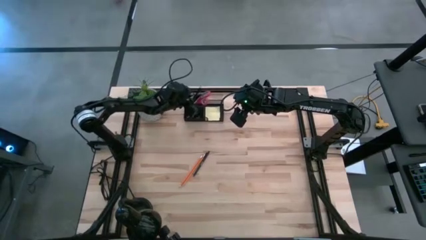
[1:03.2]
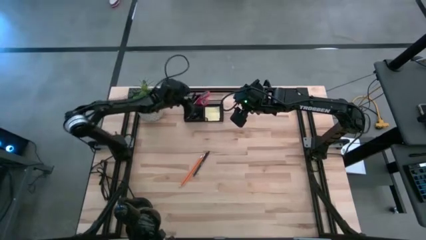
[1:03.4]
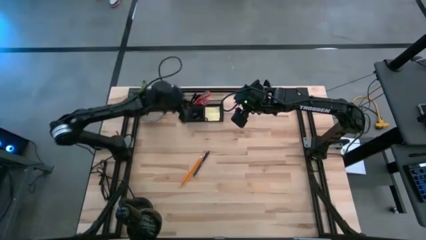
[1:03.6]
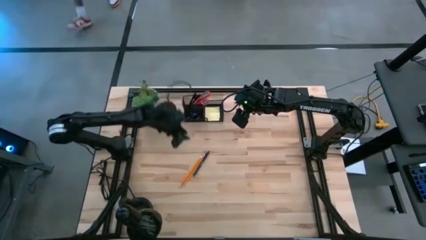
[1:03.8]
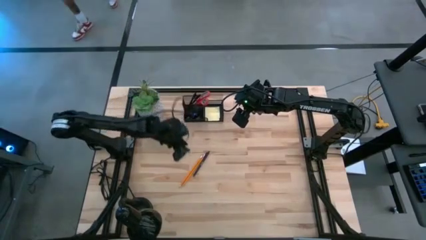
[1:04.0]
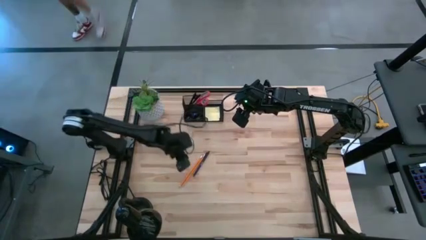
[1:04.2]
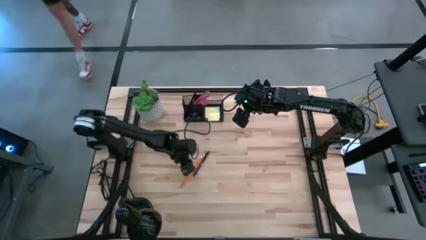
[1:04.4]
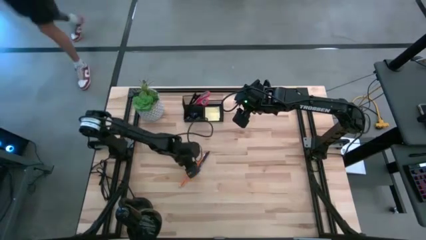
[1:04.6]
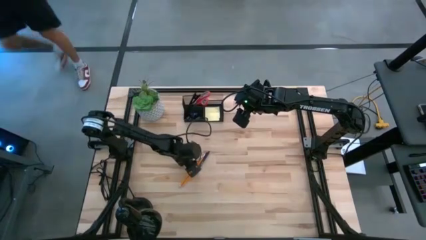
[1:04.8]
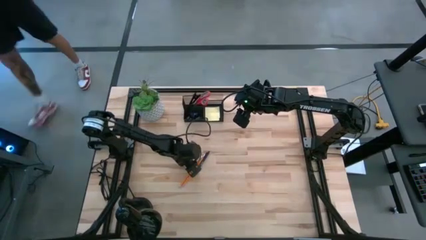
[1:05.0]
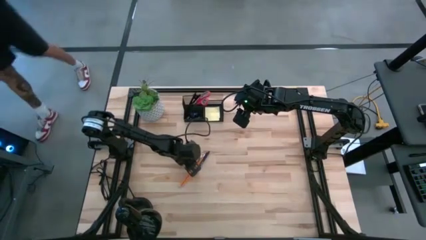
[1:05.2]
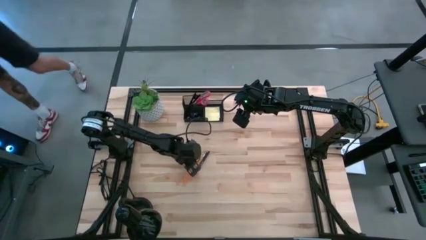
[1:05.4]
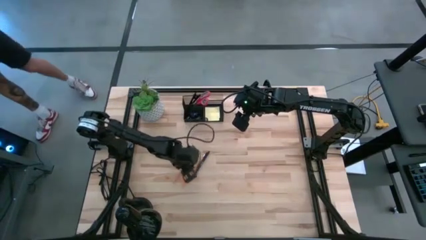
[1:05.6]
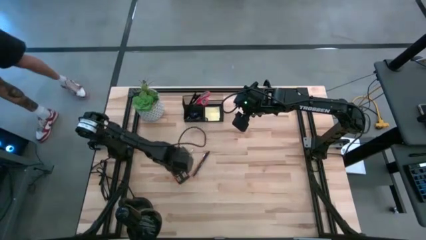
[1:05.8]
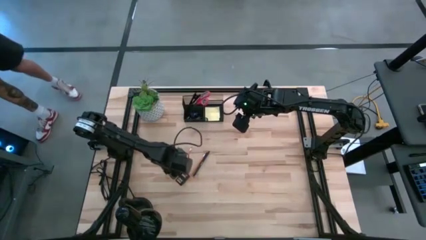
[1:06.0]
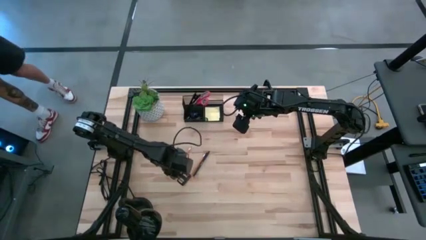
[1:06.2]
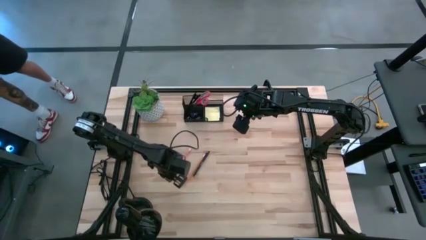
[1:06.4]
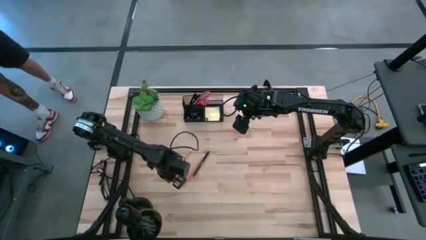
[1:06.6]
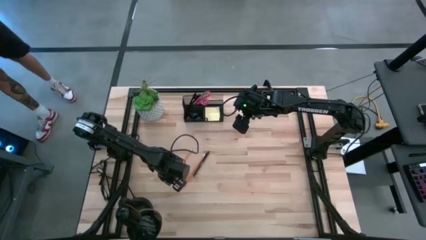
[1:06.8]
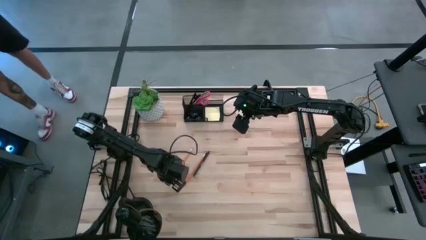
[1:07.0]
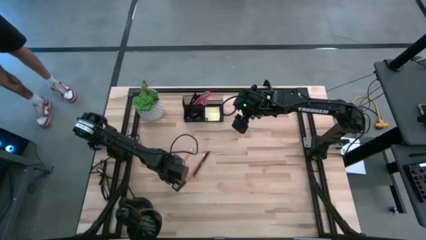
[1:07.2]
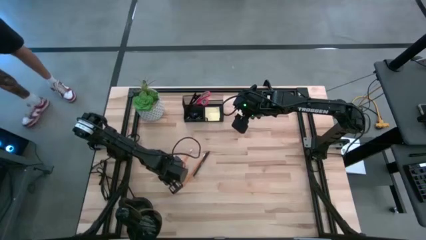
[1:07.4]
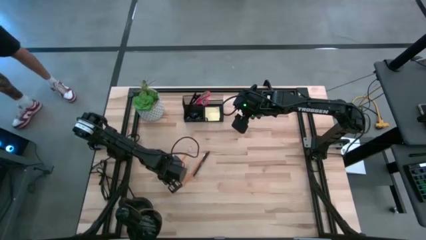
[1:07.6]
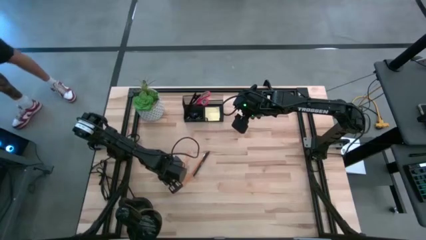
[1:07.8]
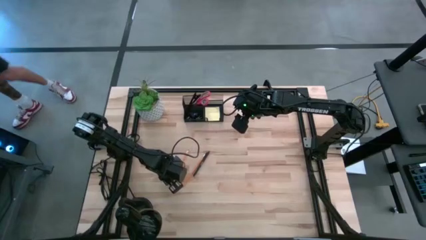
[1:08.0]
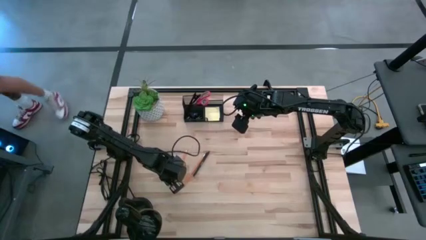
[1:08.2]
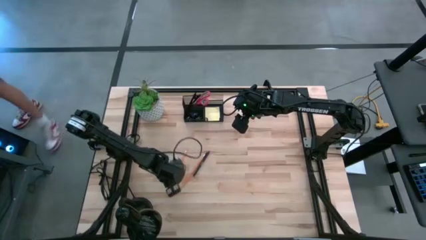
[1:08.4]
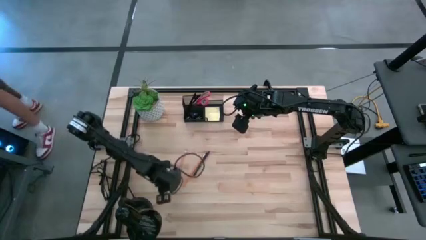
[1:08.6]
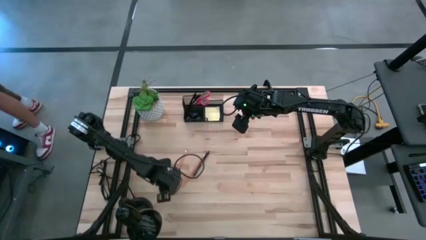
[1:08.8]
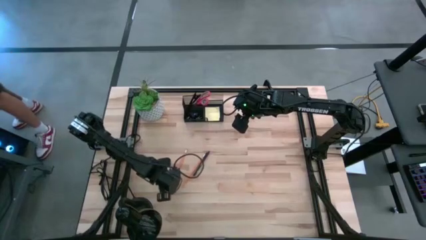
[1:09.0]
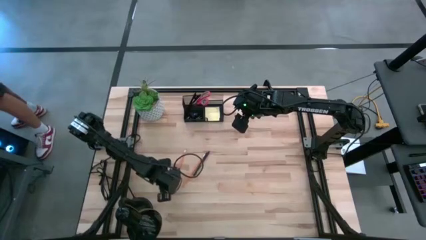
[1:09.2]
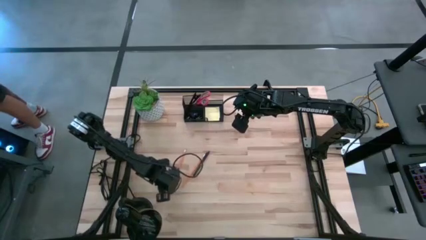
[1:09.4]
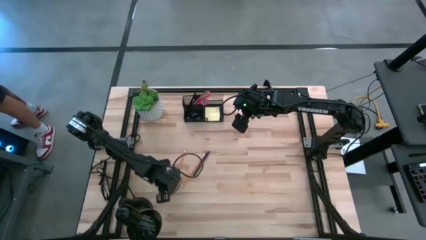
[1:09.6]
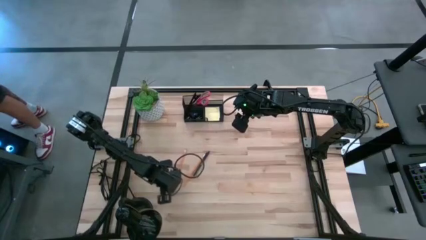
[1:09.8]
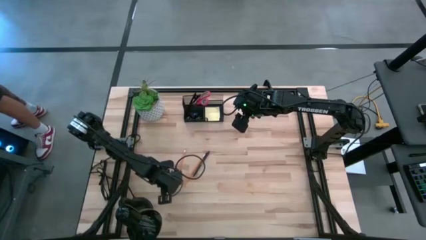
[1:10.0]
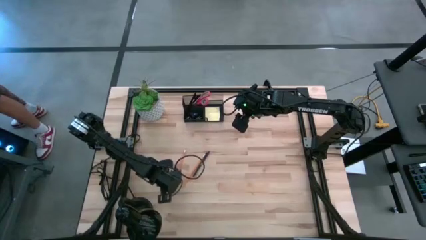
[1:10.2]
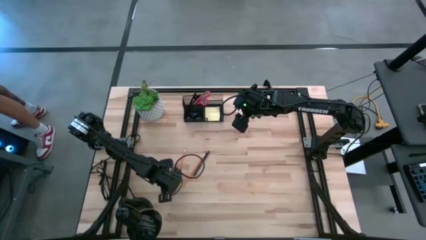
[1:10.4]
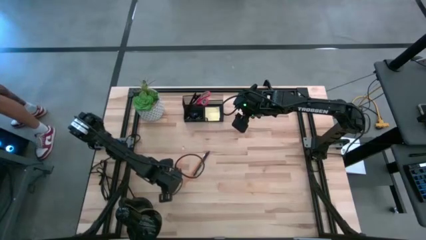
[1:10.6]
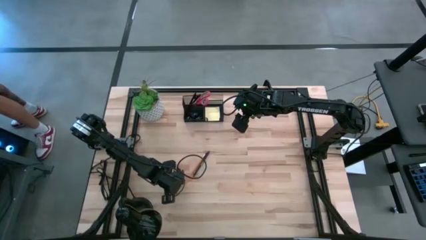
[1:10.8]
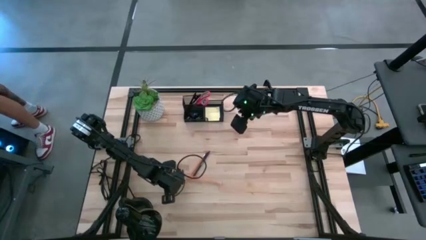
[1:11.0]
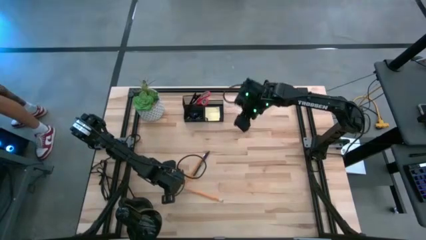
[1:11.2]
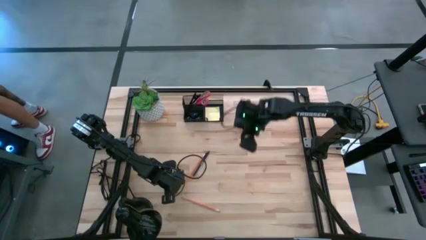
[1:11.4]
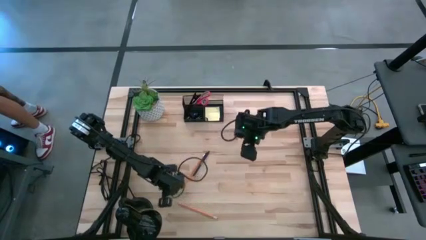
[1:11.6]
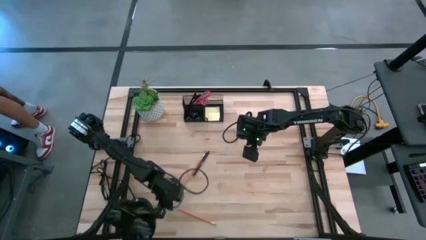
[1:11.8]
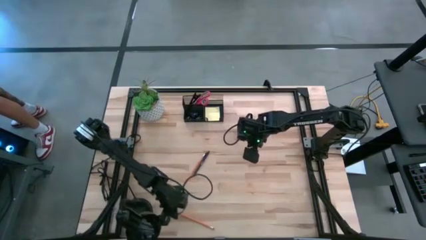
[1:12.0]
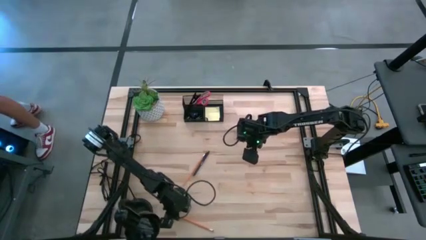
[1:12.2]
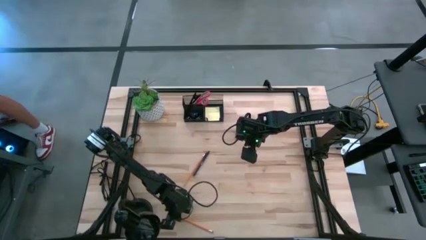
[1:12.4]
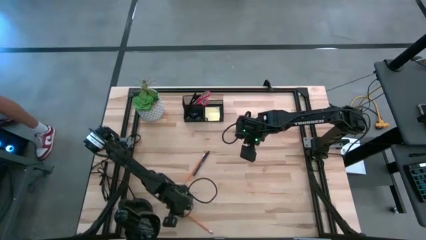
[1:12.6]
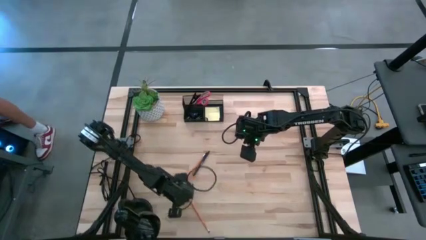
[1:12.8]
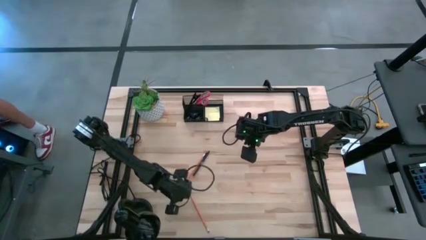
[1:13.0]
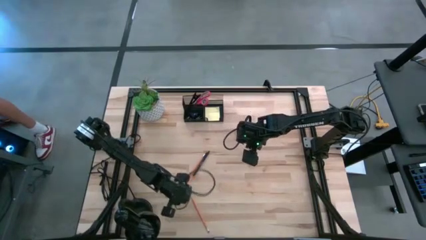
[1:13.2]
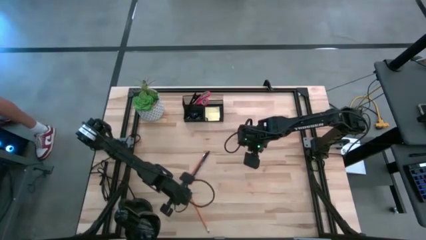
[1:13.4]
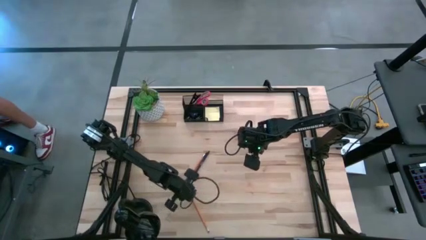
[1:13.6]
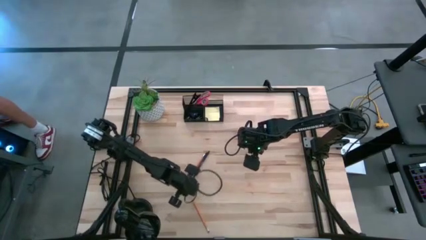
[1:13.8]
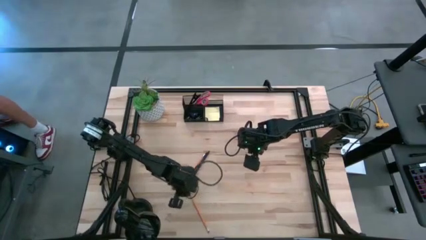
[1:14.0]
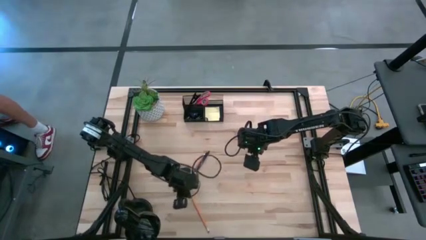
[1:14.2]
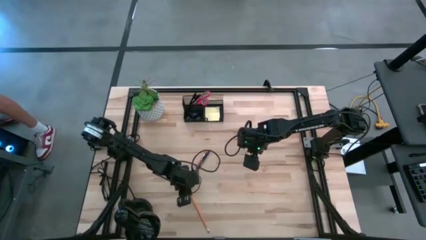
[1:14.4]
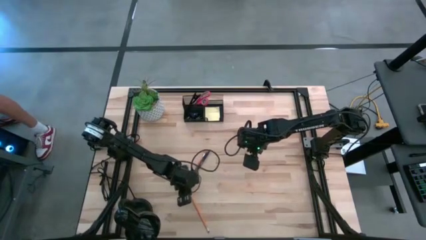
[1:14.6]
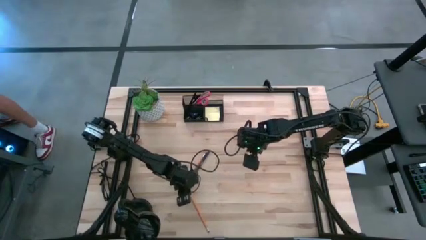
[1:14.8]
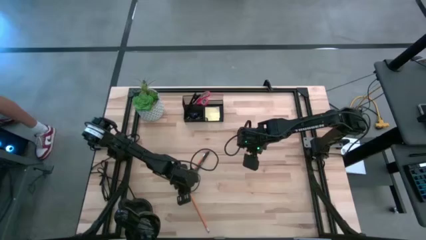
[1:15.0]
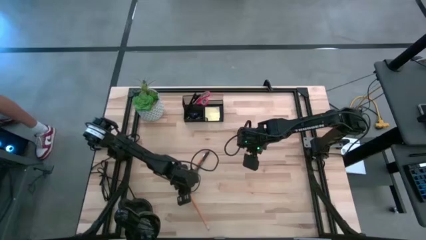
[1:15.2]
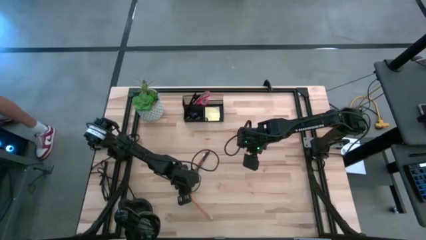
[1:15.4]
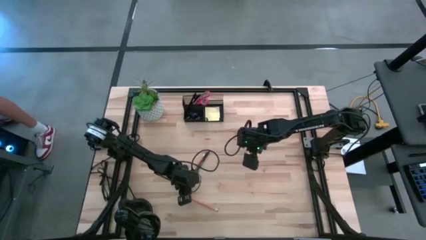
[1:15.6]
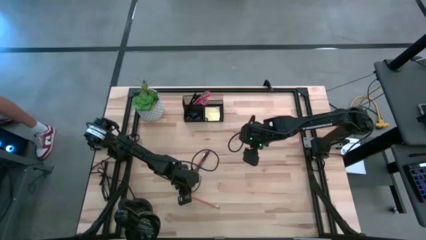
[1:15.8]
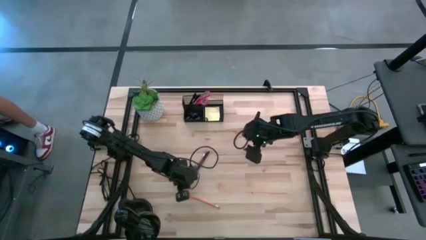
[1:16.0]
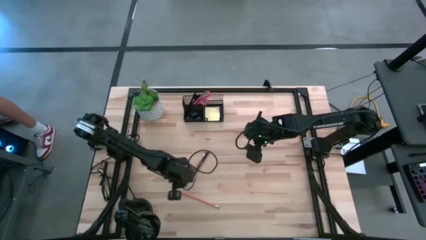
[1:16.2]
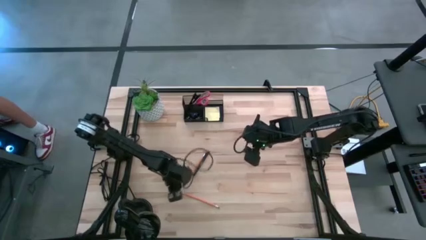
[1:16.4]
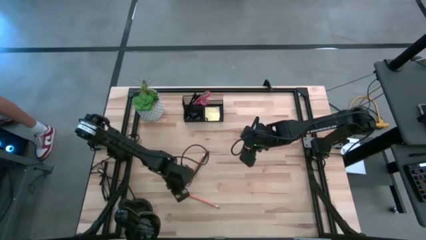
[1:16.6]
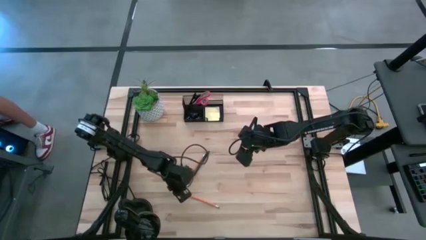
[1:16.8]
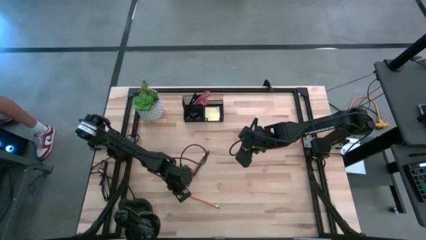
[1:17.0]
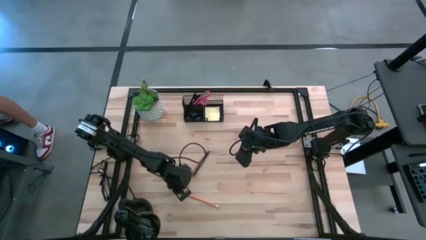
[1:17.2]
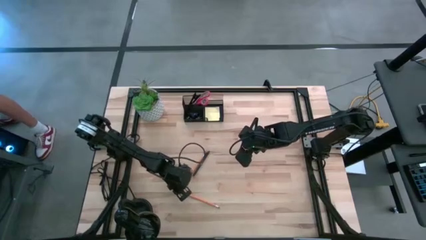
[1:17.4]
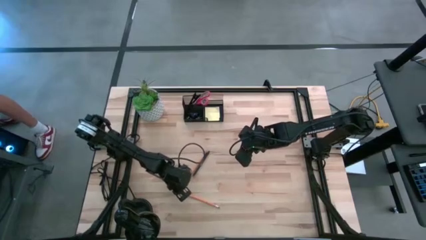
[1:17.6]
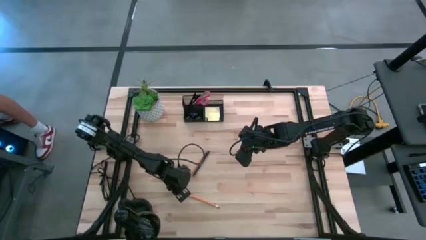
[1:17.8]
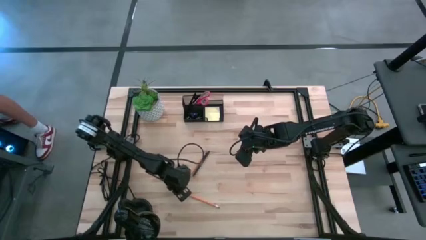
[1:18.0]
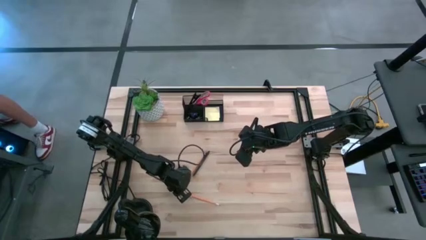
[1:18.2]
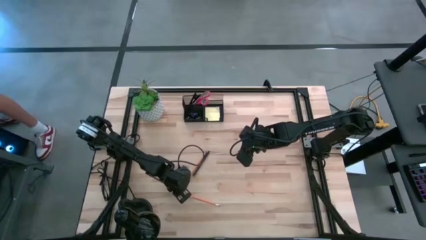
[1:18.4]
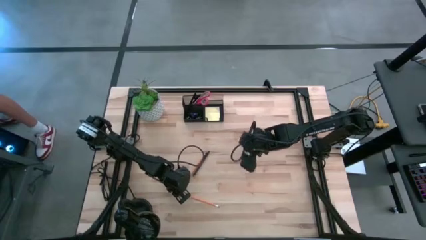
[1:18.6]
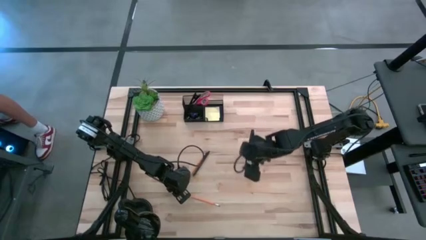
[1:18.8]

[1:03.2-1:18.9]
Task: Pick and place office supplies into organizer
Put the top pencil into the top left section of the black desk organizer
